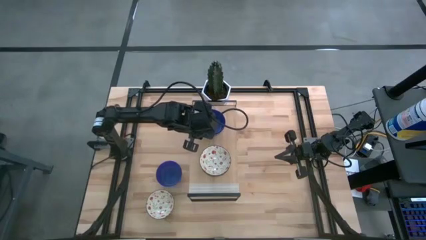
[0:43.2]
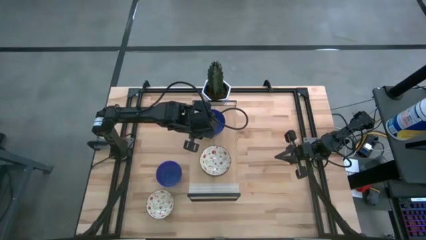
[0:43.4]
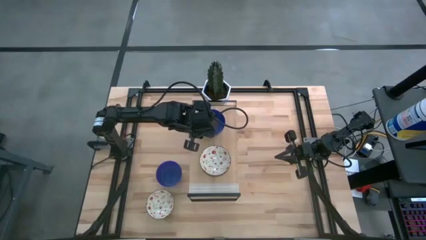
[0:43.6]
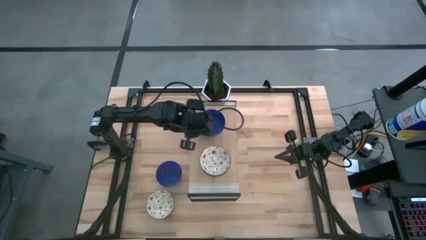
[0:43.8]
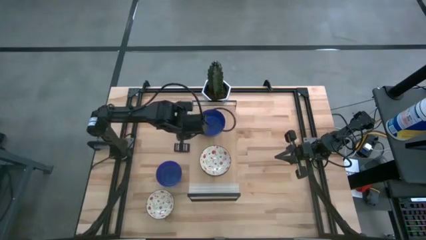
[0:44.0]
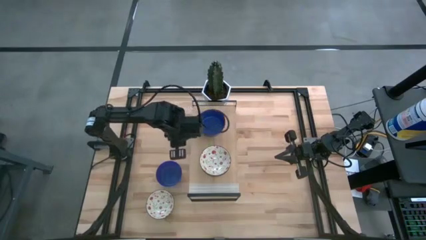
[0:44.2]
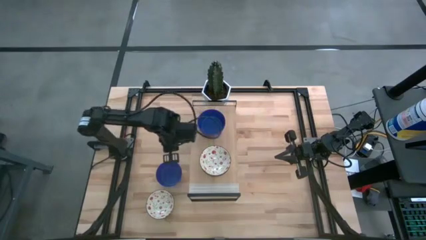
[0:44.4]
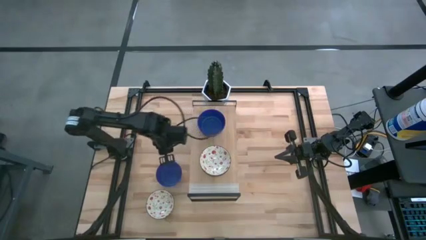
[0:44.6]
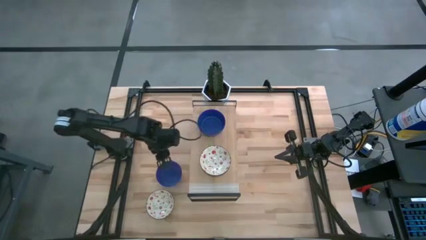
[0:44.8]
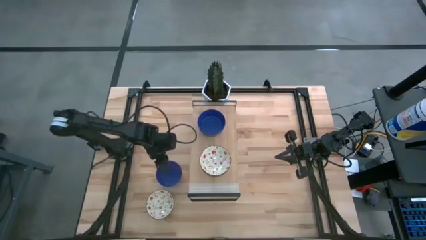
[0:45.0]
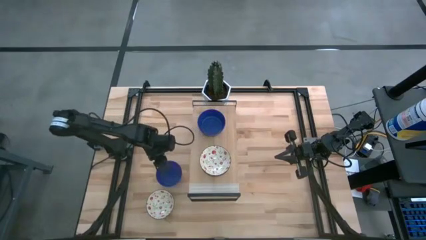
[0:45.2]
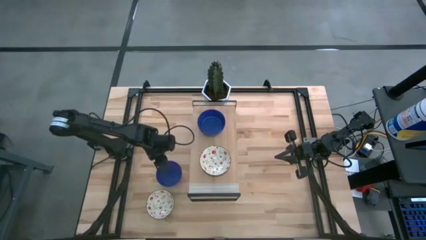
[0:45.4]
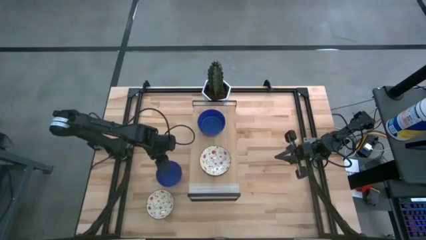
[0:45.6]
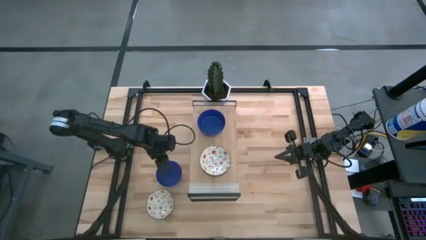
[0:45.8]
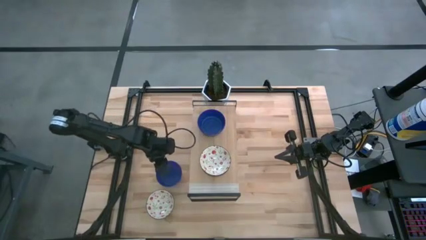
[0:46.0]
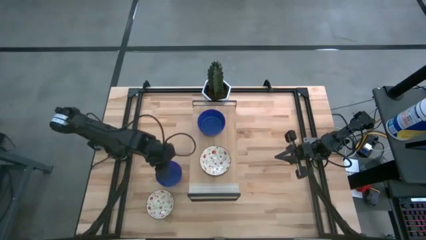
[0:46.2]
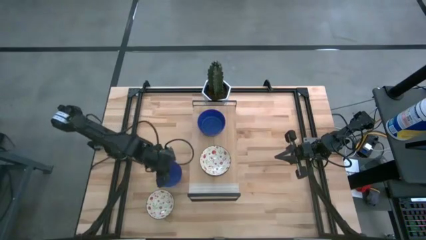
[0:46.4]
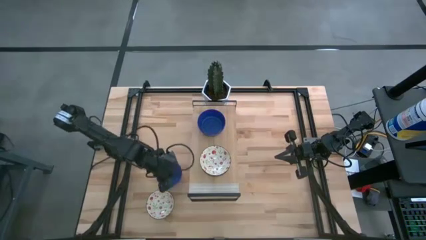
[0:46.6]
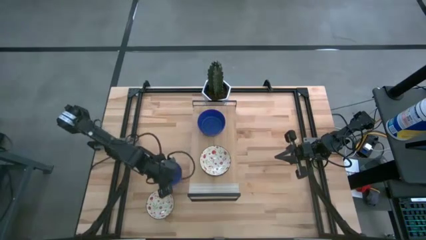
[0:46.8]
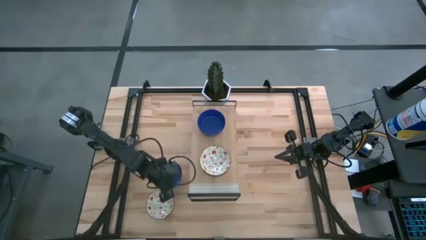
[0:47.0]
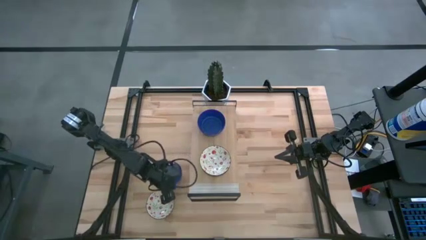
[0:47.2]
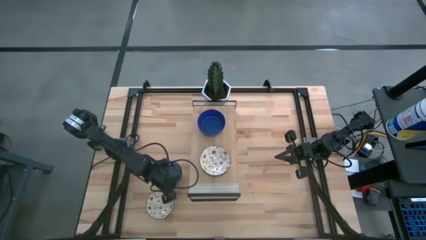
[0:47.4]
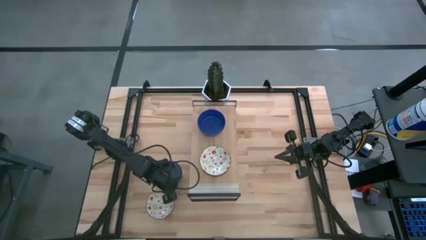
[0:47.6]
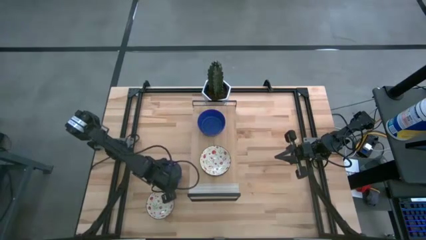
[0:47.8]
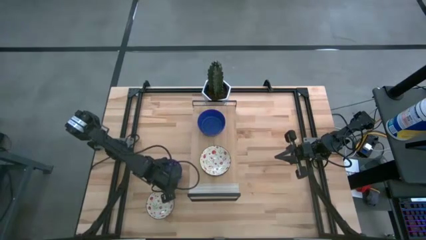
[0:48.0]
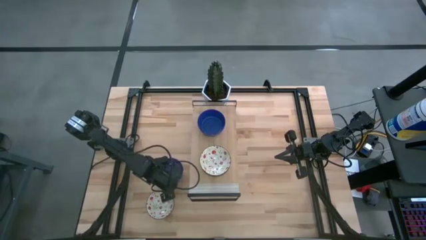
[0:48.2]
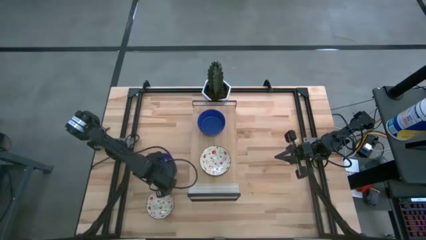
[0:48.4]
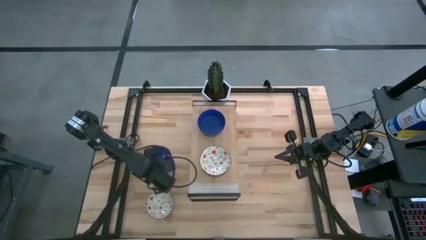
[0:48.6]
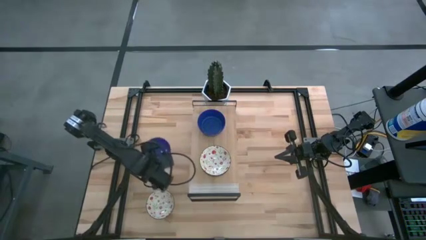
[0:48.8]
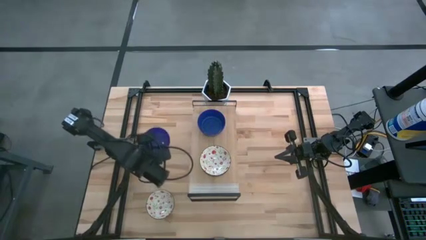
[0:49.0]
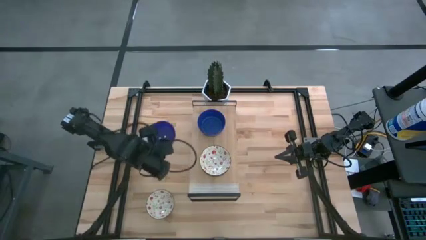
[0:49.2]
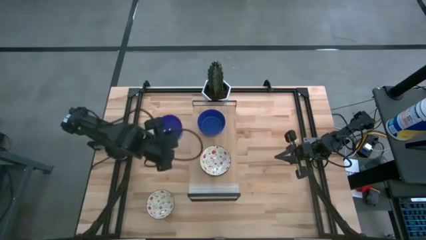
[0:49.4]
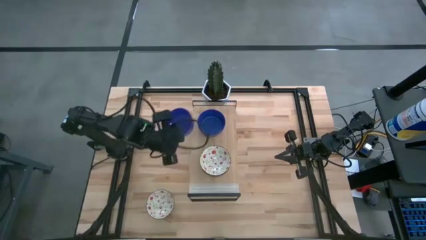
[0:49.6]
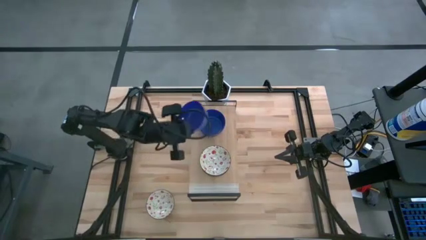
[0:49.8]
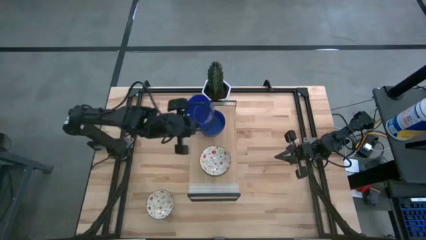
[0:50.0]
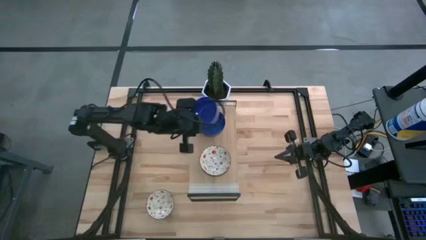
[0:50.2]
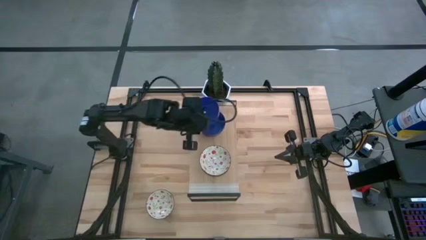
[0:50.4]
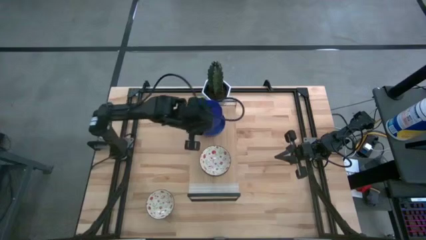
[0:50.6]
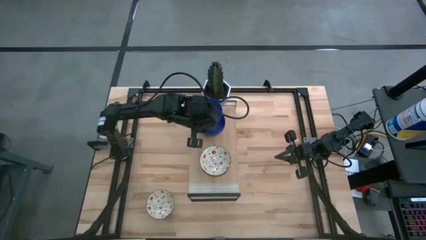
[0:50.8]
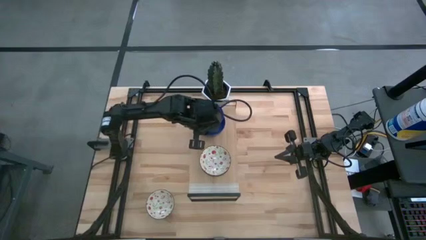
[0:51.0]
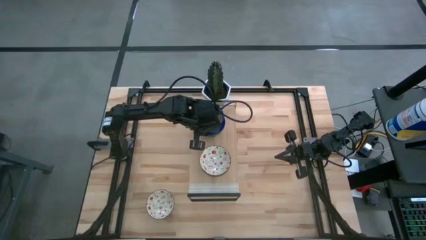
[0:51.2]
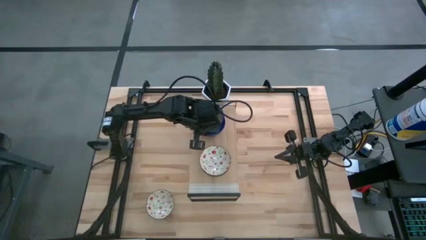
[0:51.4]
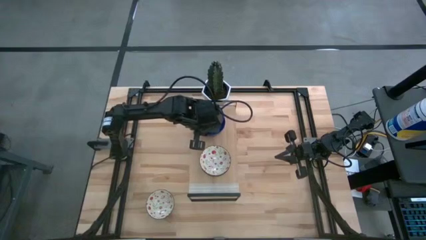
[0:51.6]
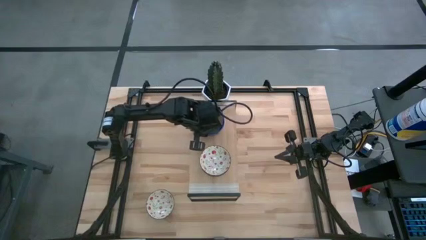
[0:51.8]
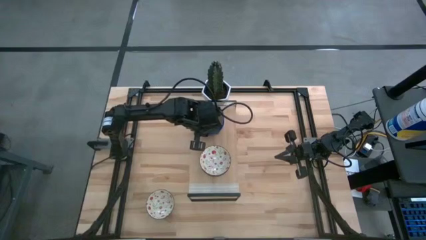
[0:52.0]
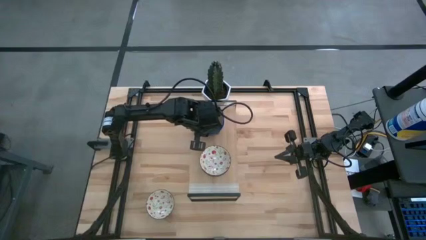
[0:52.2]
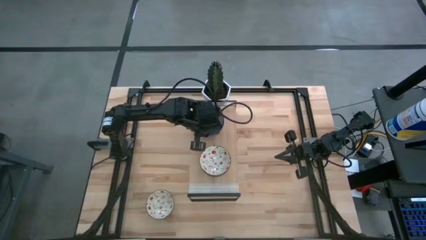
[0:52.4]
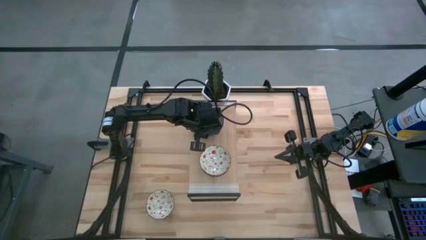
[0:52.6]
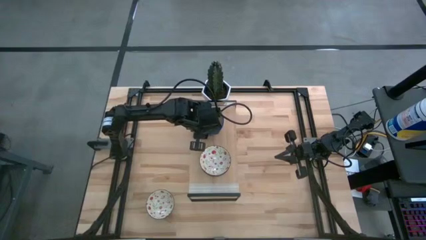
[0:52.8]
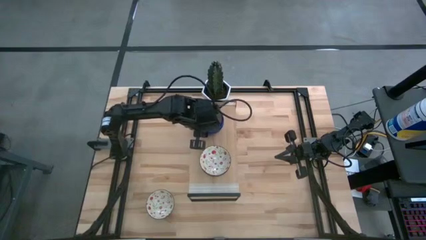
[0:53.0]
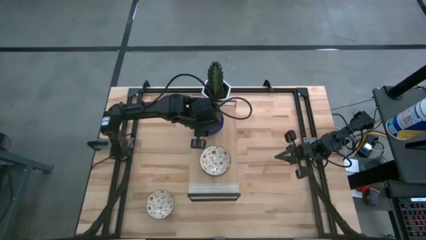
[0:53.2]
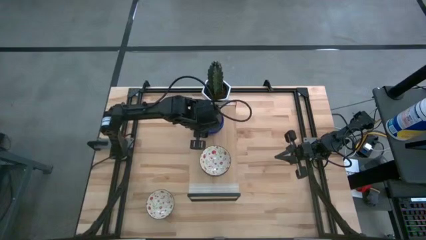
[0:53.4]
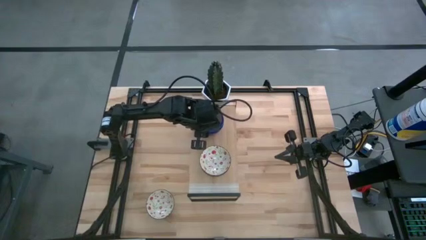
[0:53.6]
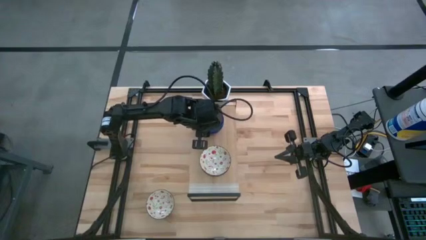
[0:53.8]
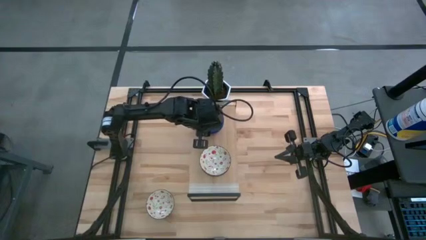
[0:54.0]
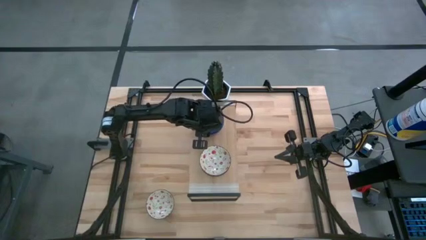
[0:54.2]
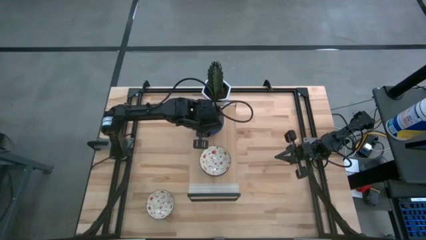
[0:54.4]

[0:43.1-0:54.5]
Task: Pick & Place Mini bowls
Stack the blue bowl on top of the blue bowls on the shelf

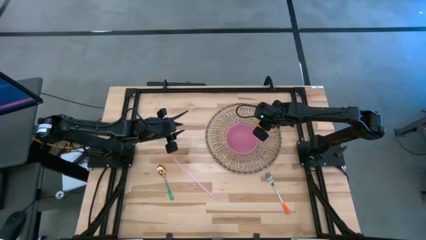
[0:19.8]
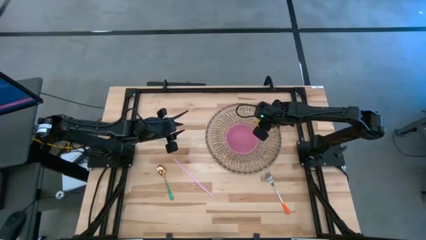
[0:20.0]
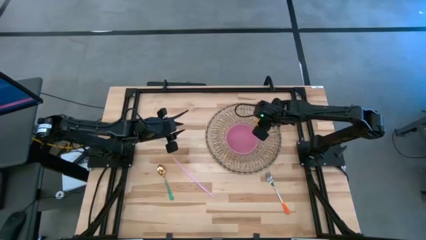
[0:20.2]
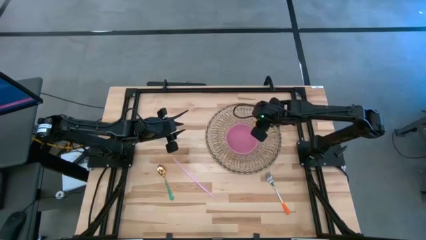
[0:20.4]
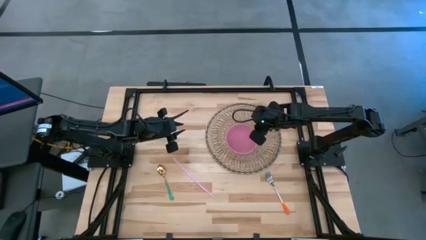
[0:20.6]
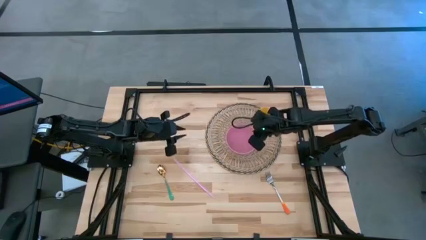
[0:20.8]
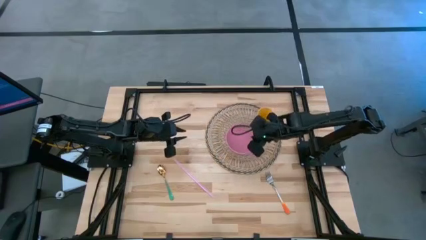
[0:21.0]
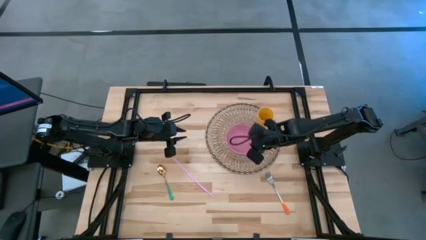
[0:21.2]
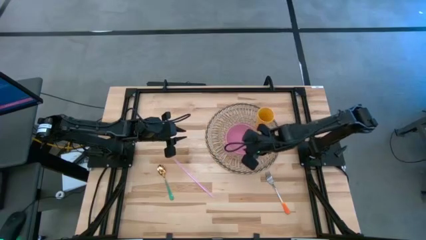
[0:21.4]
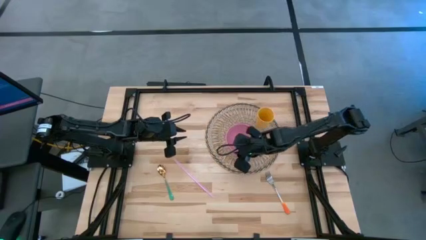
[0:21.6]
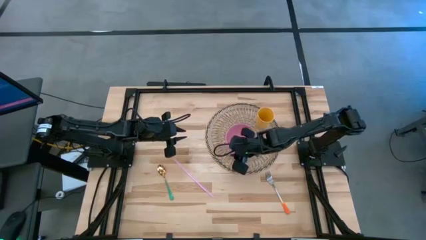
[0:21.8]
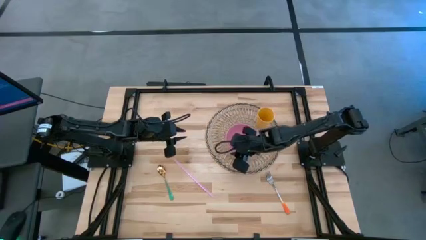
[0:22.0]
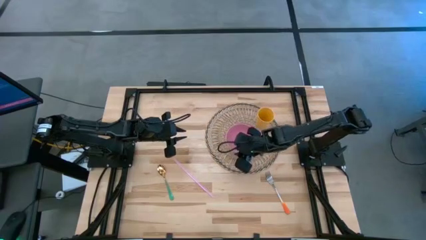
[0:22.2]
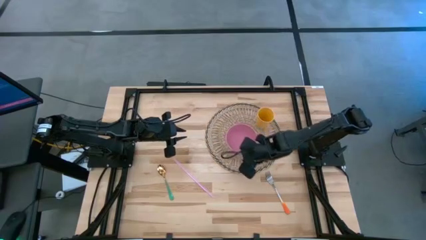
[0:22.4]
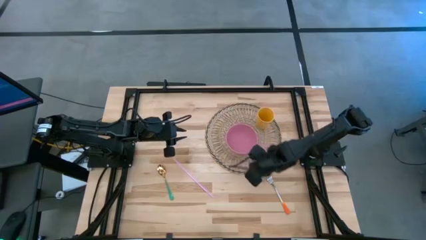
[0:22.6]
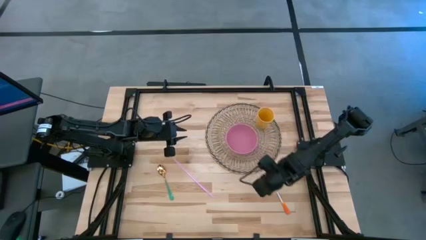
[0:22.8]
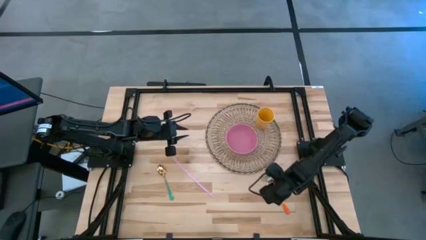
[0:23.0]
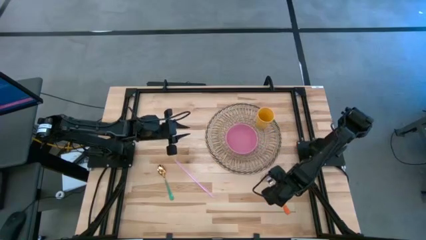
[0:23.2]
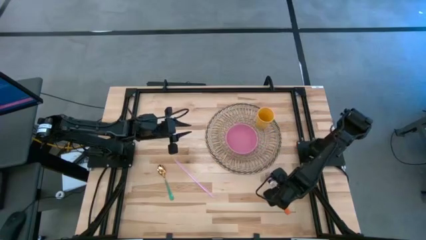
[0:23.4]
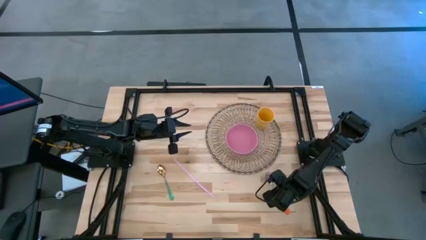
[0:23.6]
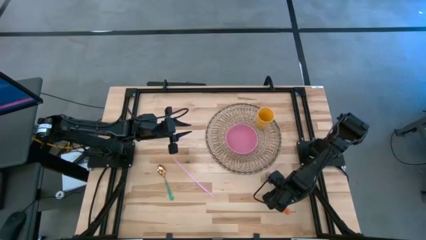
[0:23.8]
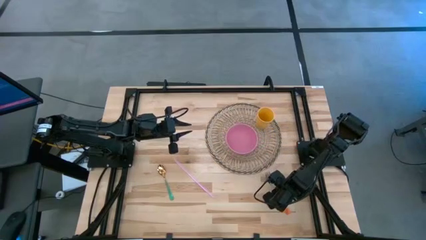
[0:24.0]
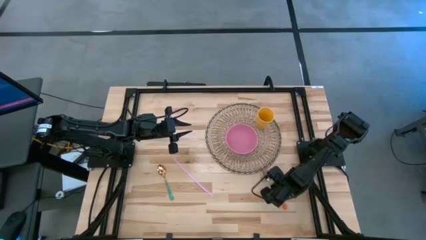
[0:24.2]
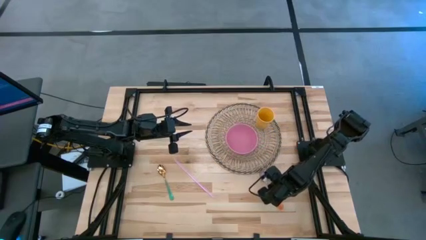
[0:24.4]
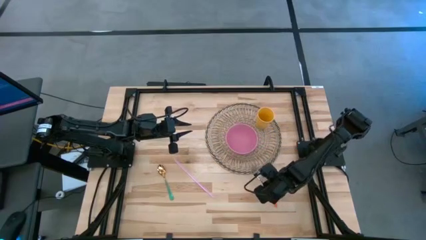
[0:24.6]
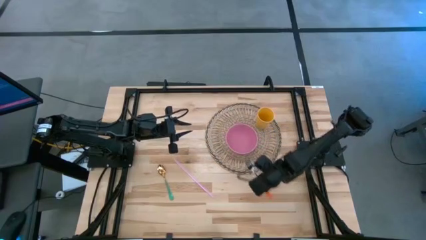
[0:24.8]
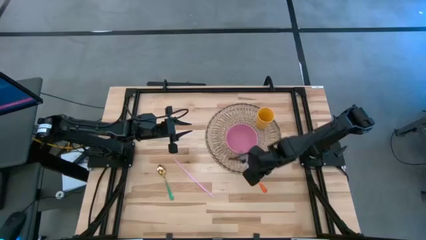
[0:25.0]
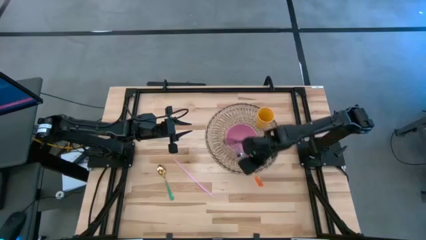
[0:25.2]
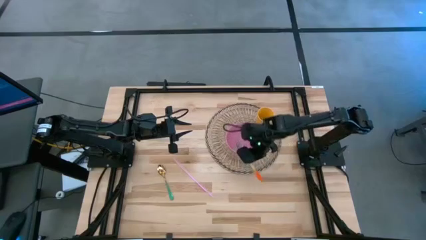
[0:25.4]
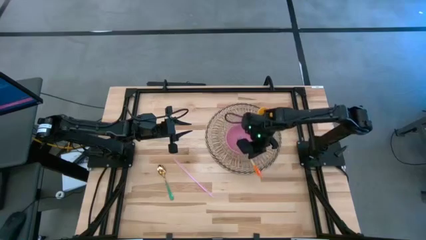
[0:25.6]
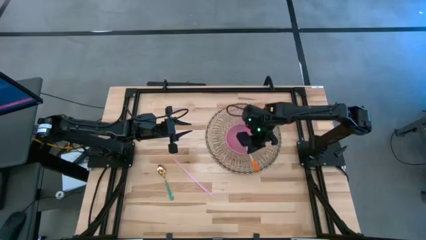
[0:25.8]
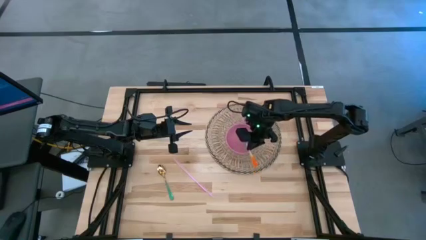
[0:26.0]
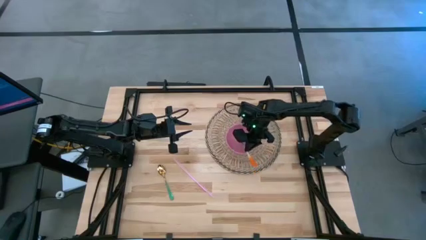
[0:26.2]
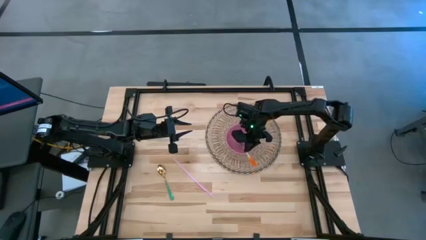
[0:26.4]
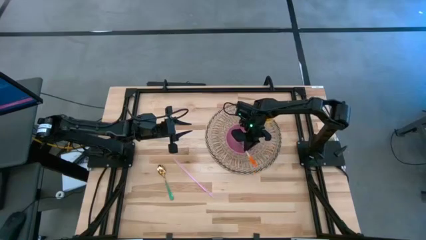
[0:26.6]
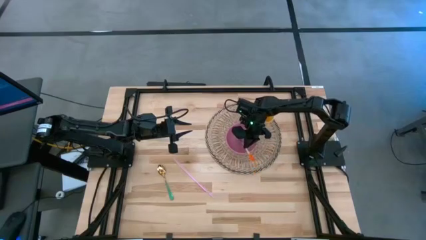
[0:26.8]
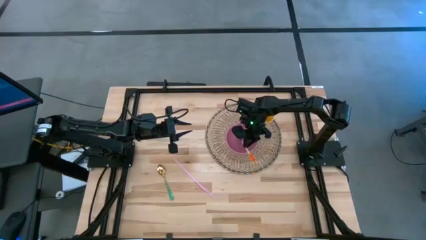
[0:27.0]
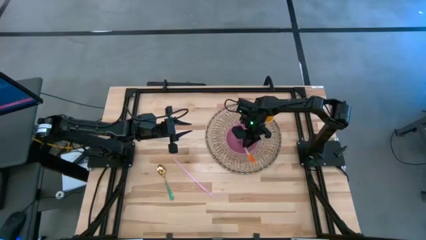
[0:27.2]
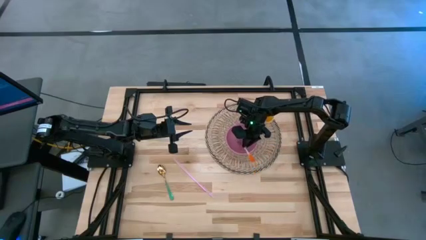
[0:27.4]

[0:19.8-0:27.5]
Task: Pick & Place Utensil
Put the orange fork into the pink bowl
